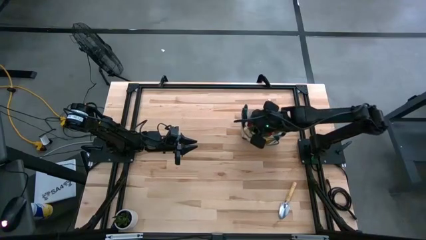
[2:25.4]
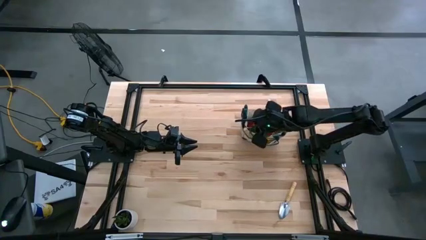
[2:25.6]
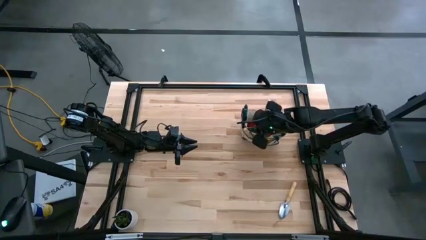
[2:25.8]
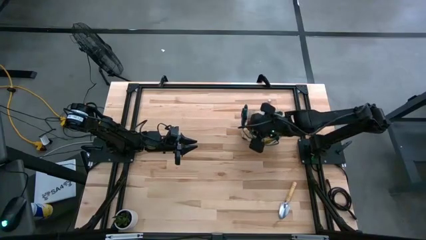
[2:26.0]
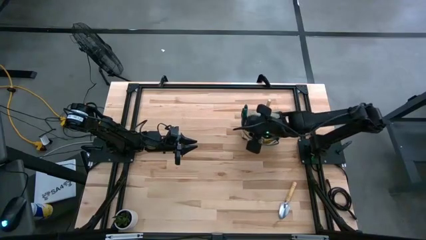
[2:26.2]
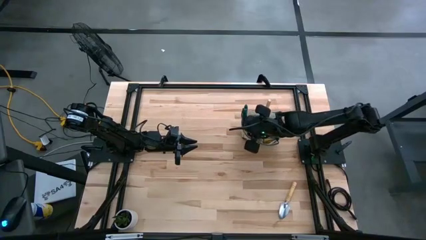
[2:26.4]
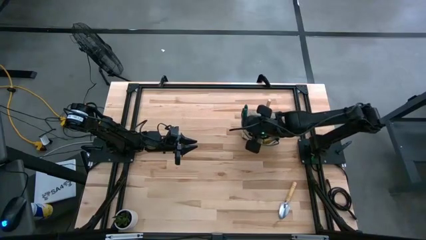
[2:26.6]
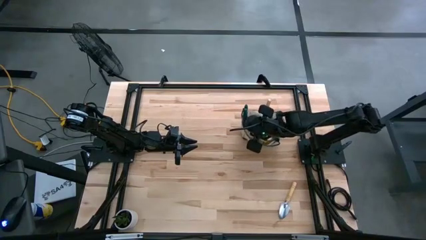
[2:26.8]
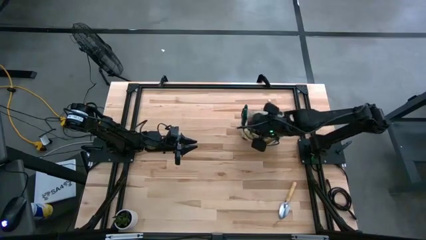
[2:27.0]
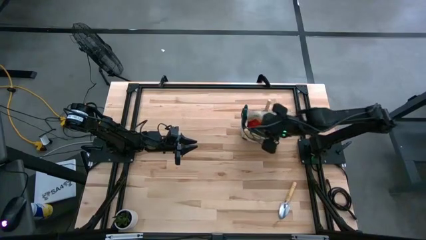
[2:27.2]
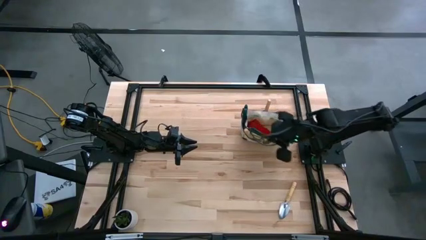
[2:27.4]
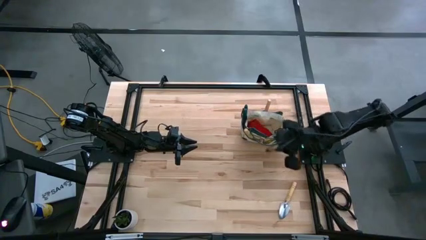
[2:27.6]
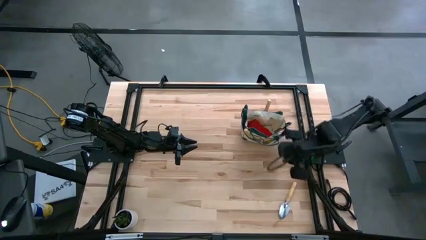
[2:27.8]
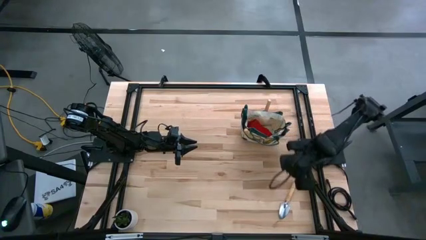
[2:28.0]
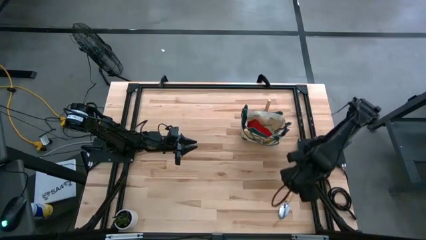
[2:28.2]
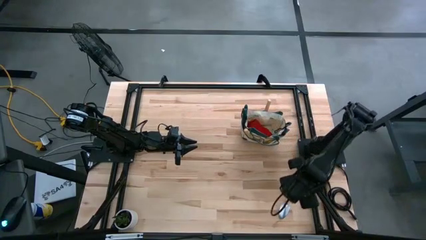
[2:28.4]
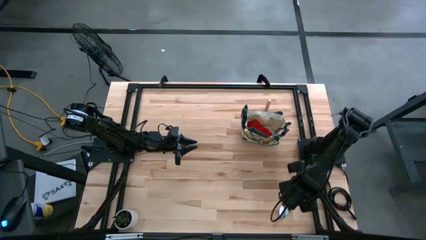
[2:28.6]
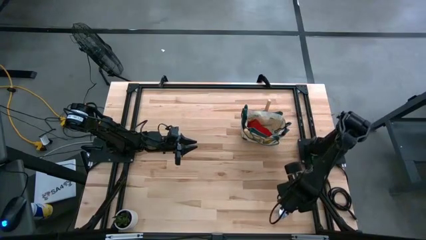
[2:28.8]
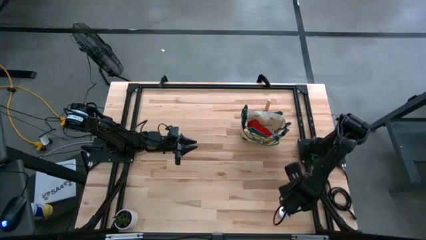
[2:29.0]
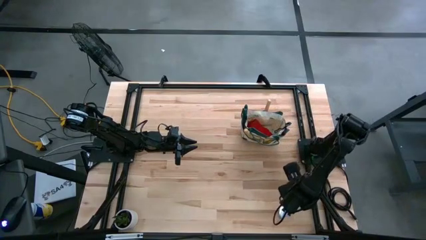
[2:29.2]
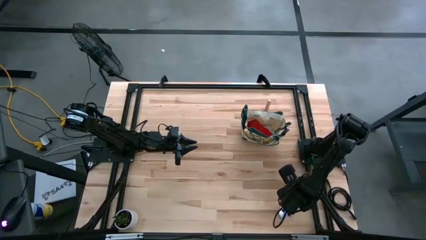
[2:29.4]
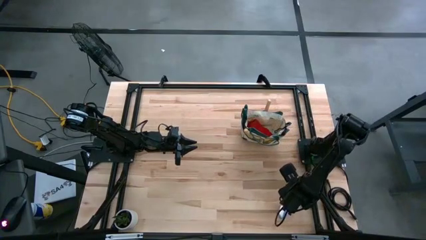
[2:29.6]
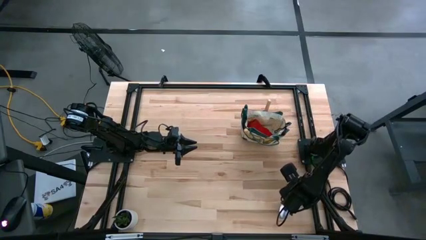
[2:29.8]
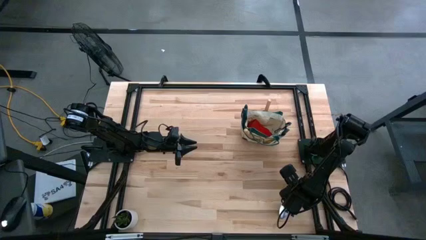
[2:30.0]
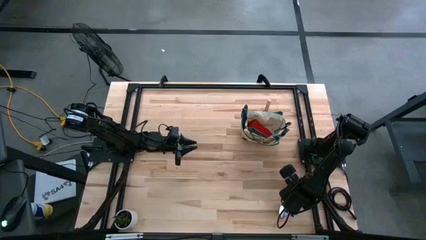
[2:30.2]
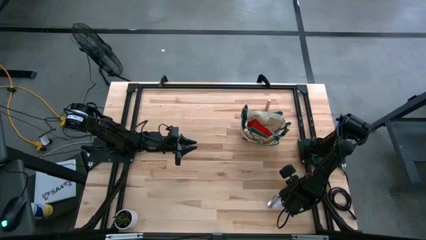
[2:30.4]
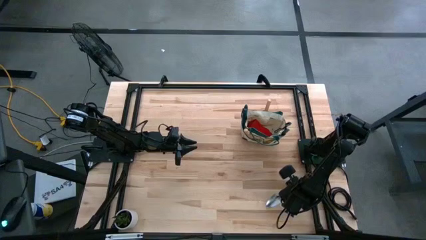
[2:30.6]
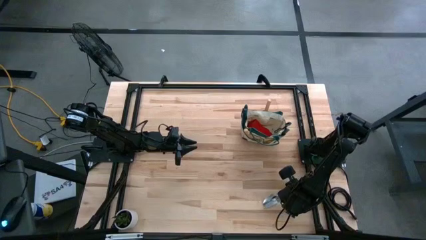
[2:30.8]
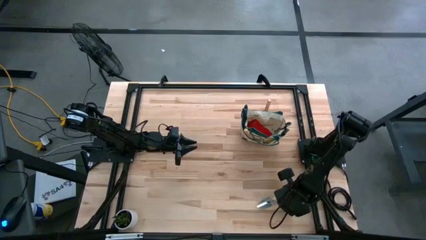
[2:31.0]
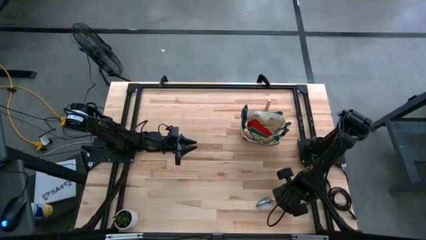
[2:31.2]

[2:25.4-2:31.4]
Task: Pick & Place Garden tools in Gardening bag
Put the trowel into the gardening bag

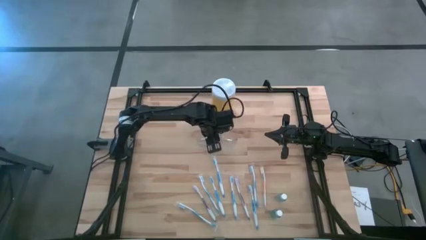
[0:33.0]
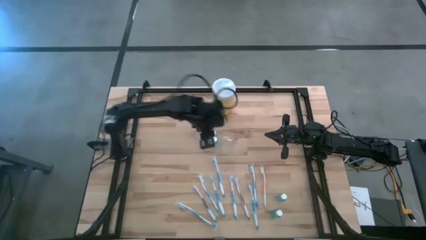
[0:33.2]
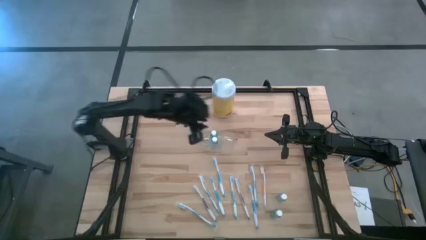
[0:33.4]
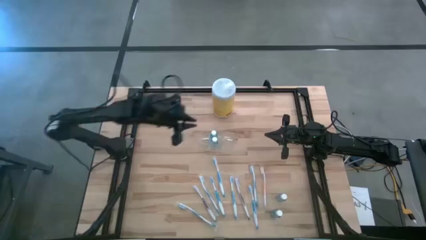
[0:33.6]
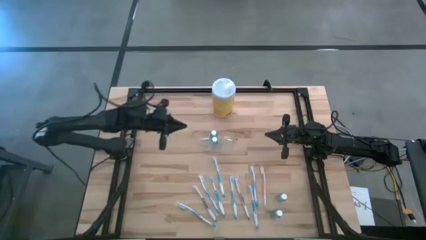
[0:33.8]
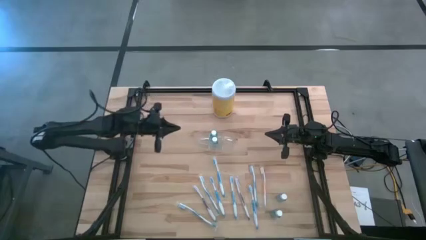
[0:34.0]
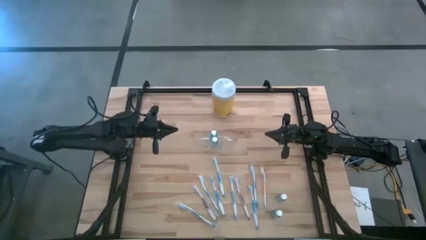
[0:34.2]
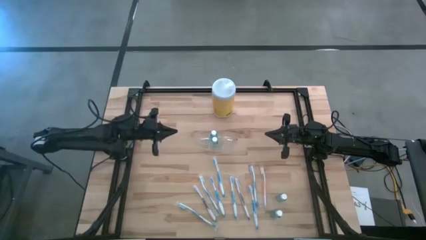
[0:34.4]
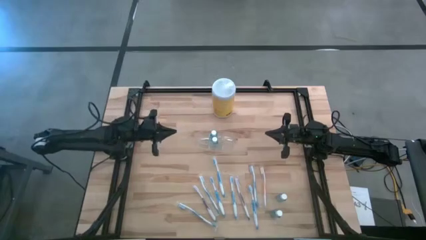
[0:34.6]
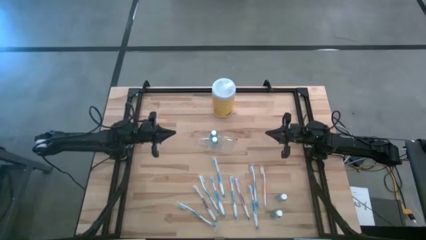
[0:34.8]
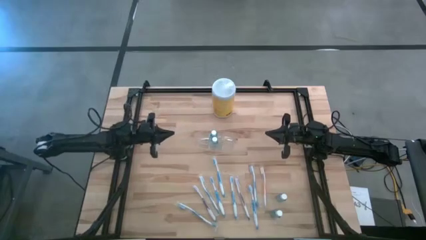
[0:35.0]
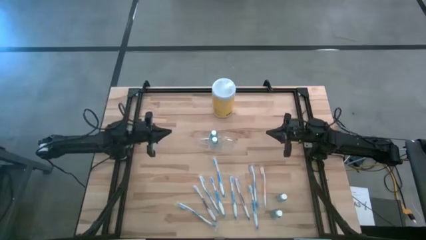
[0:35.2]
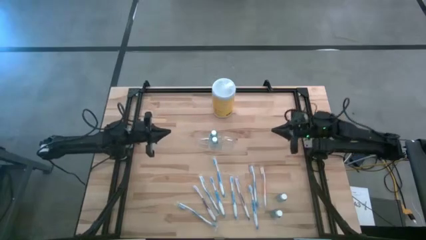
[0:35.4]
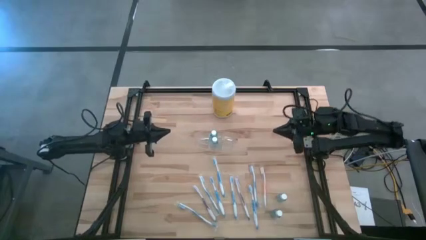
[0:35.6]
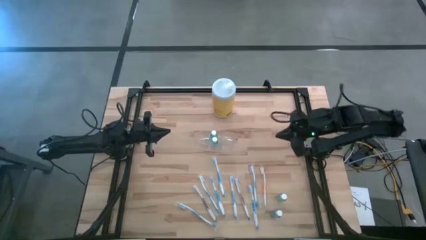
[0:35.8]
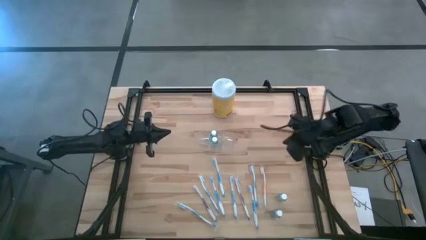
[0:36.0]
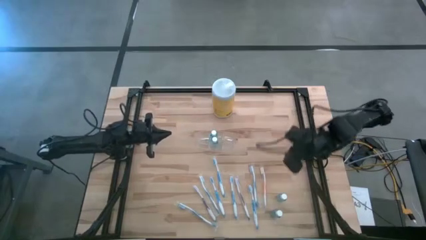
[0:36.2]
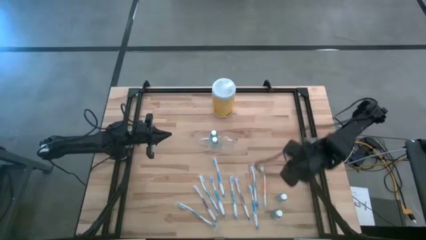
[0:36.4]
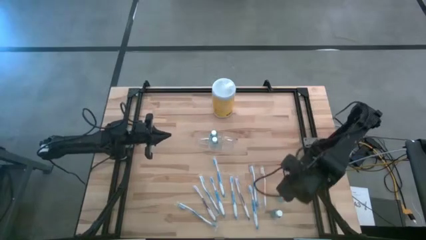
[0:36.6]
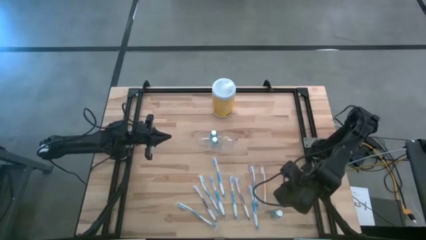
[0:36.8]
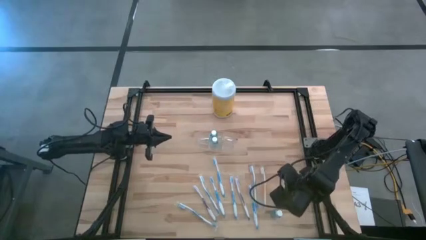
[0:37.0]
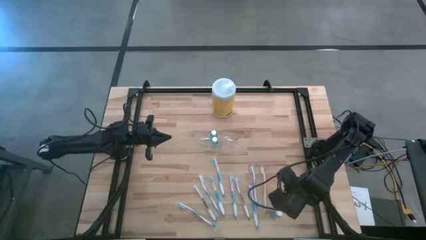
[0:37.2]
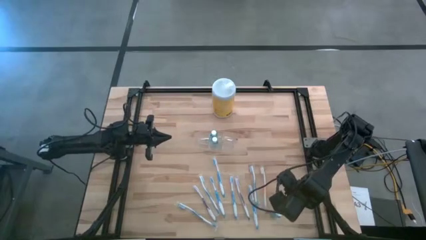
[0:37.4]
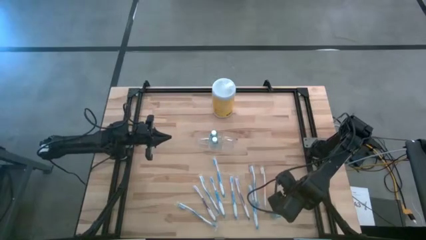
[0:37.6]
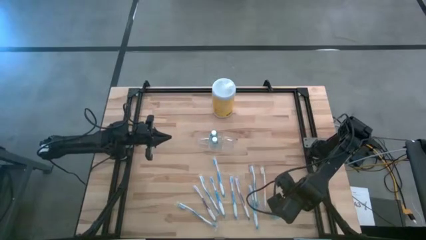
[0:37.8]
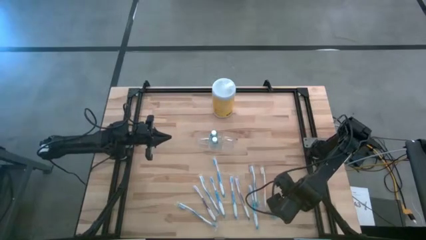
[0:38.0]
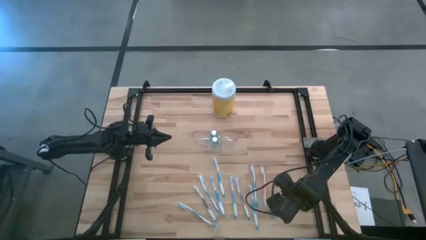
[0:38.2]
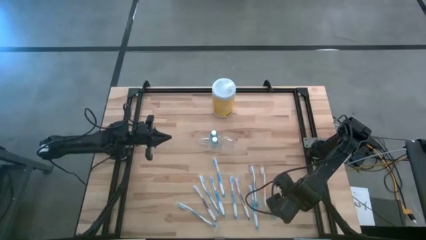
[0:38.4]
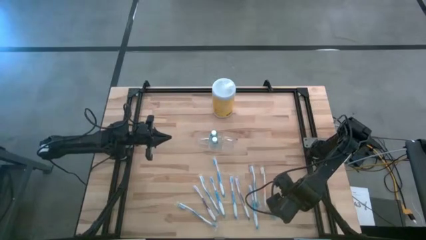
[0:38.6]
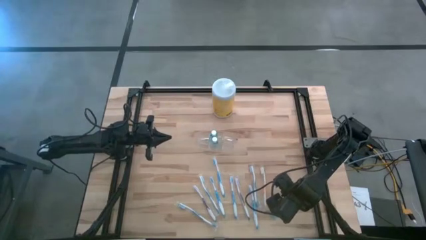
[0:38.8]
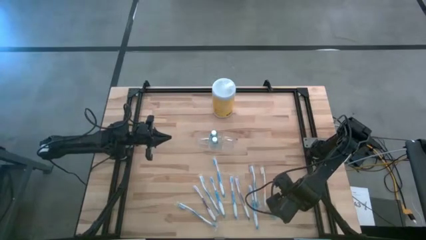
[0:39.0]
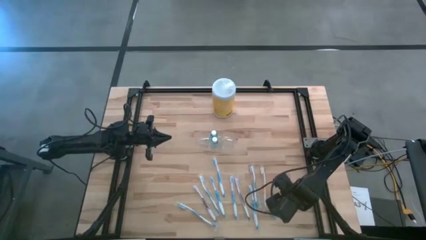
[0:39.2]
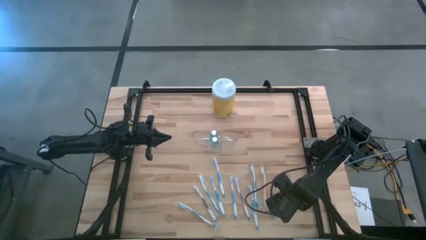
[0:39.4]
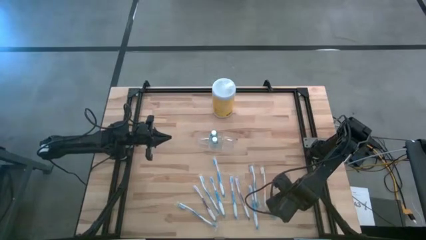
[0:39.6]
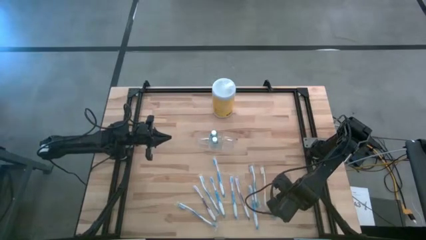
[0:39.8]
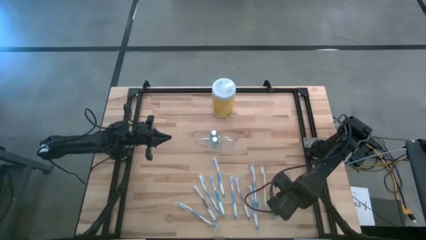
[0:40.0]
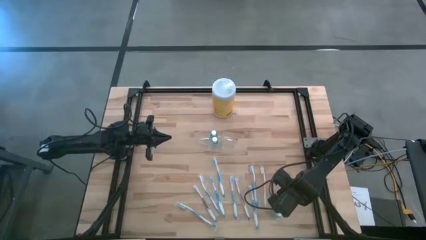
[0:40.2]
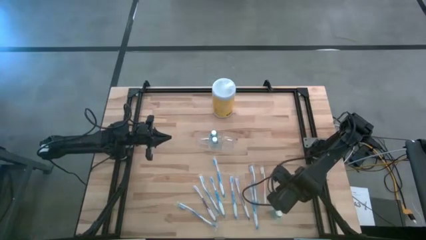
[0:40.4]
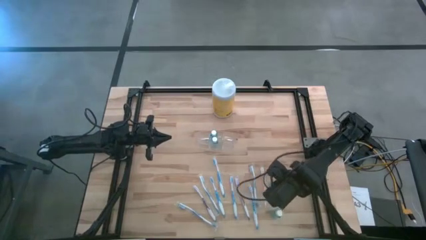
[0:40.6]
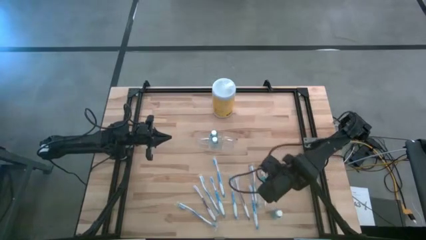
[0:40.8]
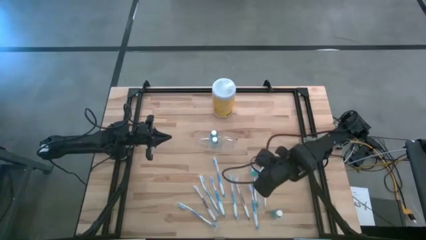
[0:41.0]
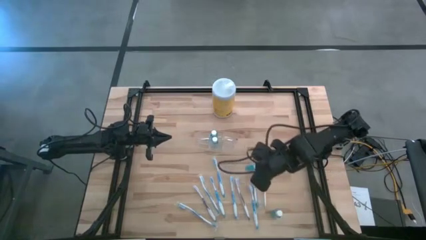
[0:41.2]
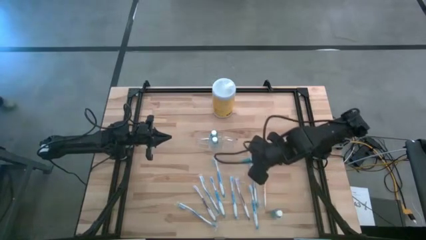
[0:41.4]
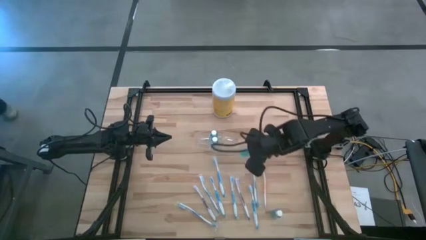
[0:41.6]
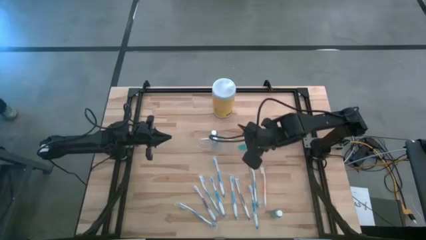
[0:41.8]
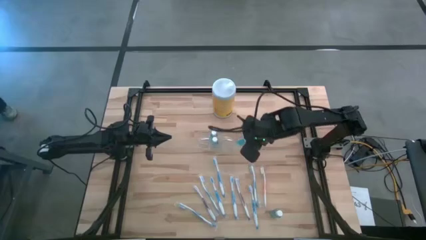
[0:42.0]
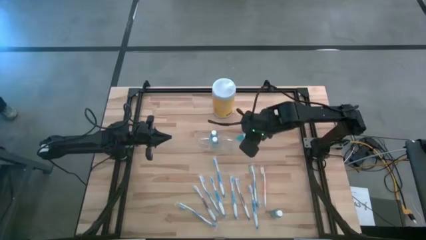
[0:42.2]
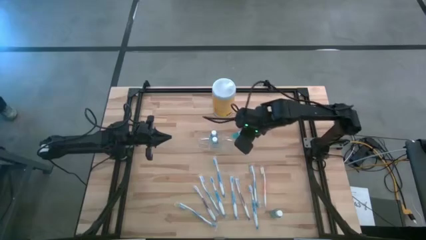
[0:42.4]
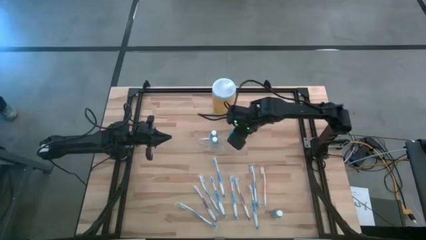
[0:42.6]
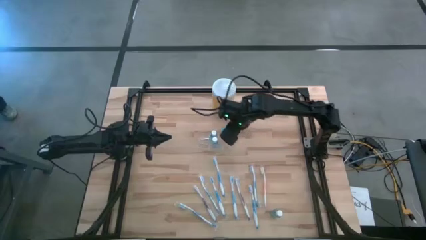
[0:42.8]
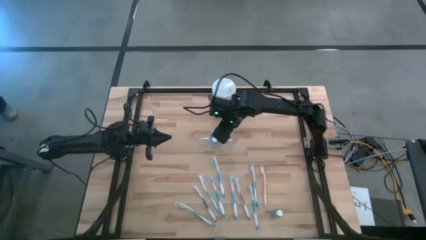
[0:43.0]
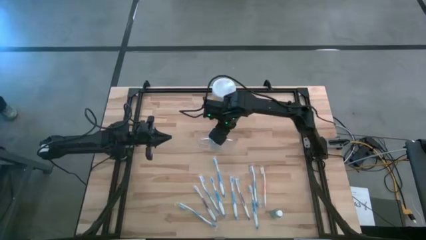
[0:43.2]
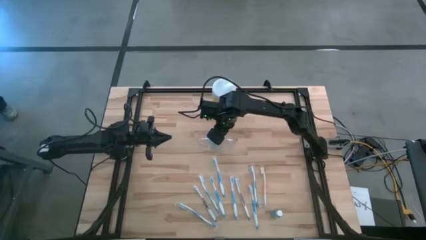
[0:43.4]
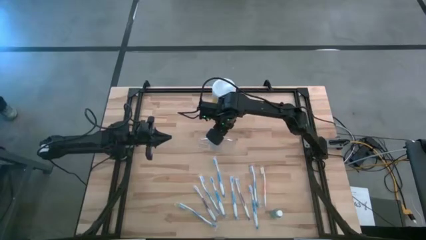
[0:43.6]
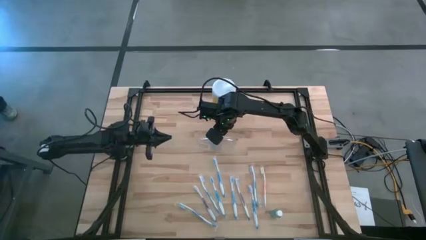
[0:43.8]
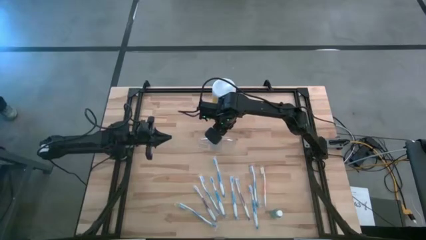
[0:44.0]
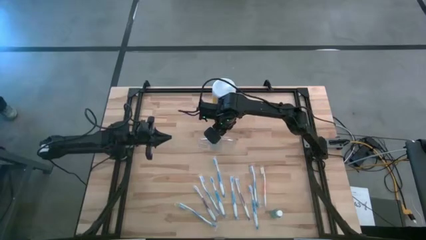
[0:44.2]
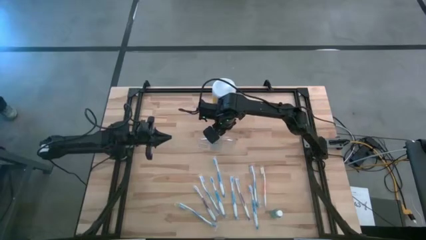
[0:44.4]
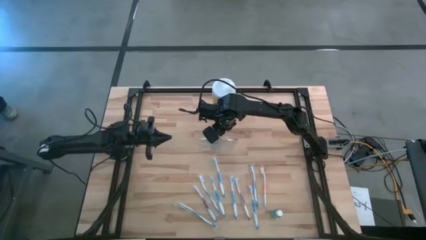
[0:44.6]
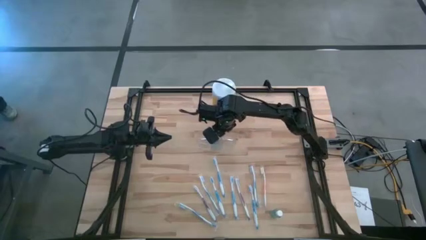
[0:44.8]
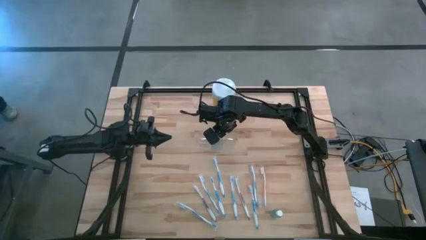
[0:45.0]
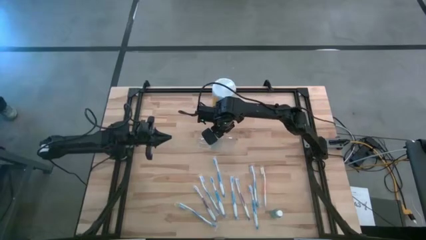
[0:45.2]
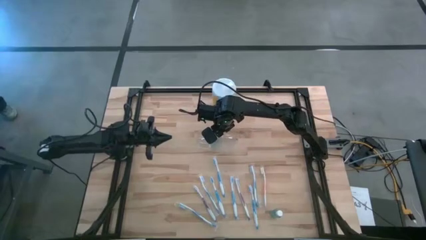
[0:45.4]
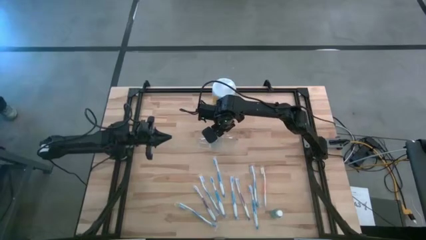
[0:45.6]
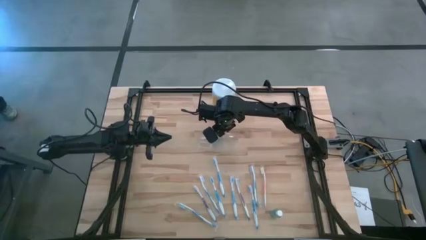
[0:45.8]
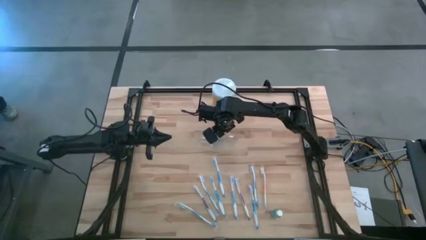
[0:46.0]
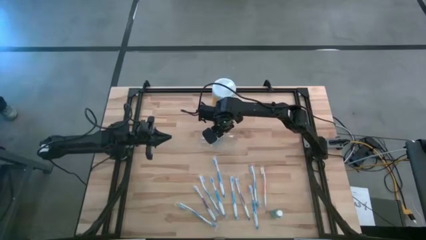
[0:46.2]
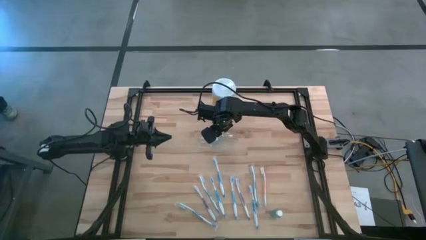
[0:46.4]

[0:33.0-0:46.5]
Task: Pick & Place toothbrushing station
Put the blue mouthwash into the transparent organizer
